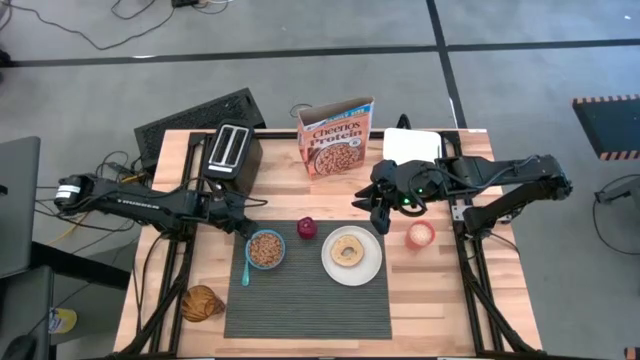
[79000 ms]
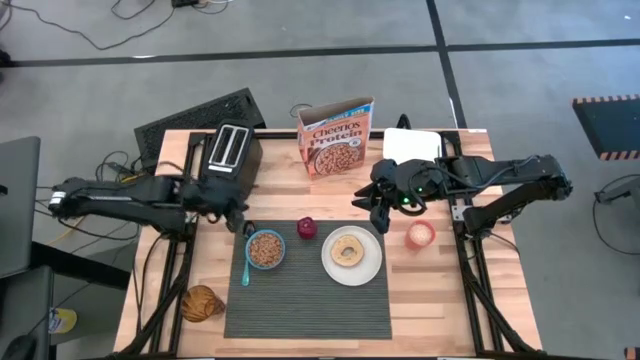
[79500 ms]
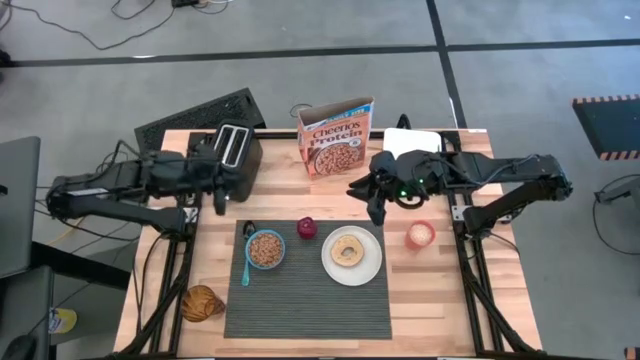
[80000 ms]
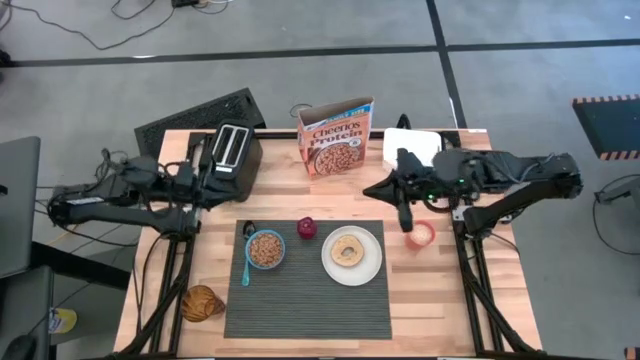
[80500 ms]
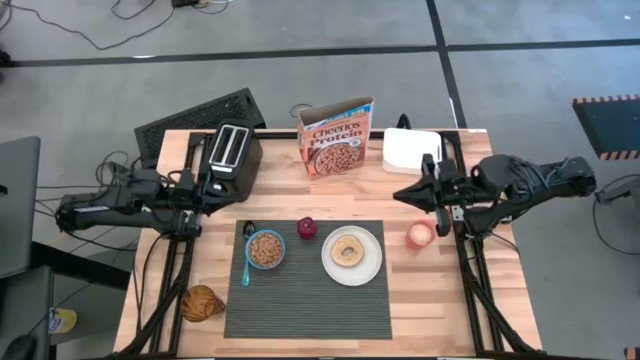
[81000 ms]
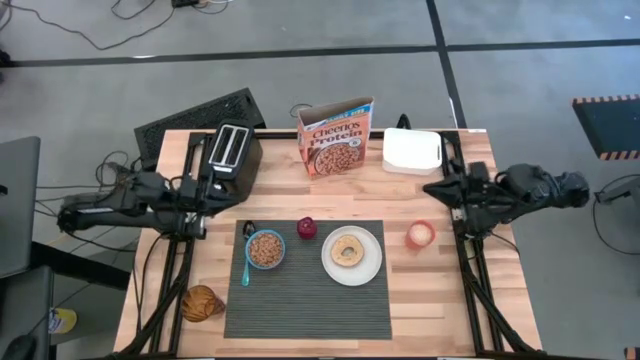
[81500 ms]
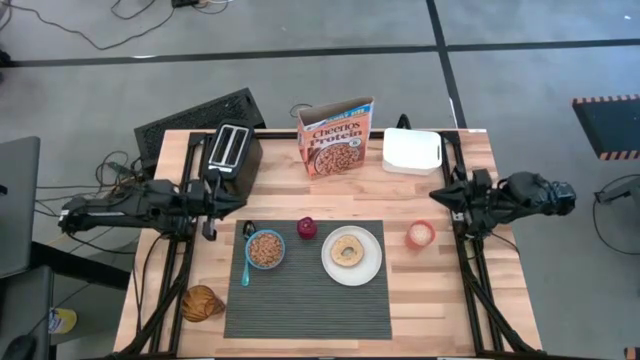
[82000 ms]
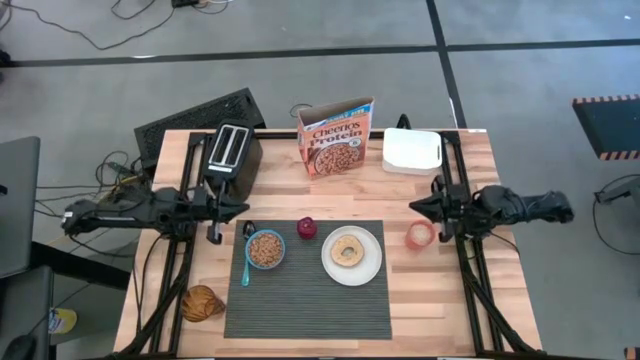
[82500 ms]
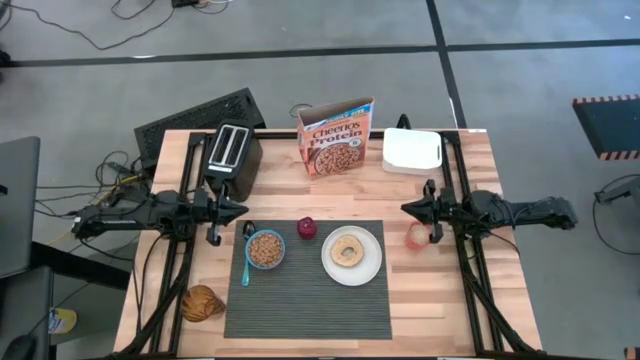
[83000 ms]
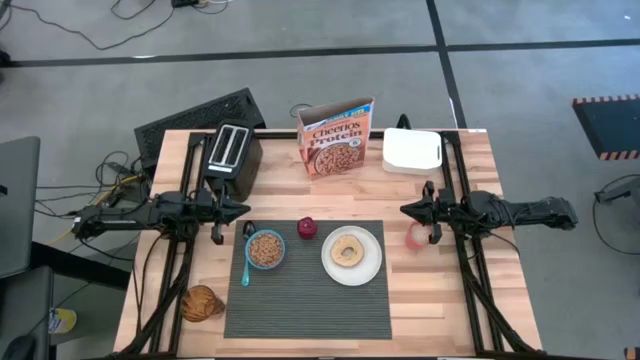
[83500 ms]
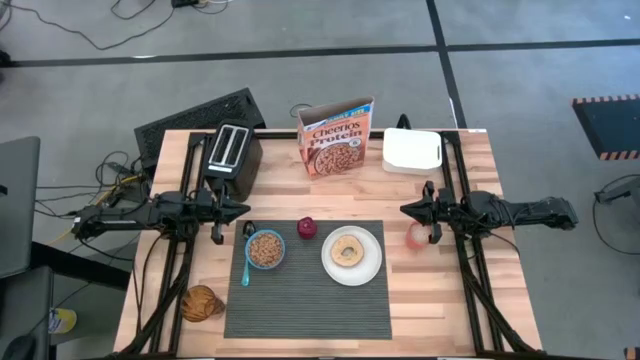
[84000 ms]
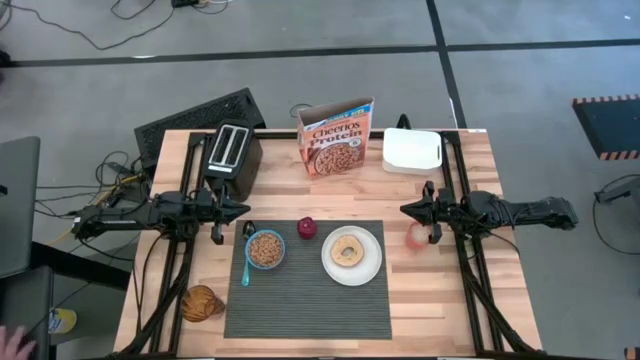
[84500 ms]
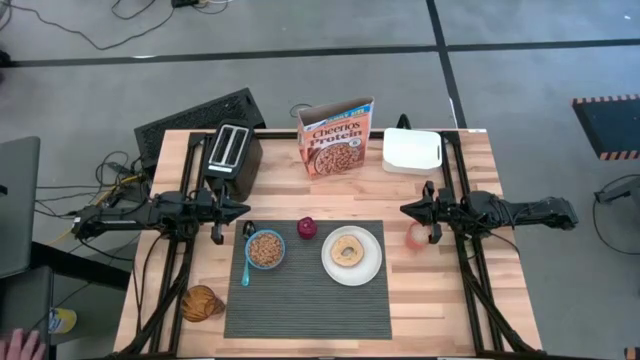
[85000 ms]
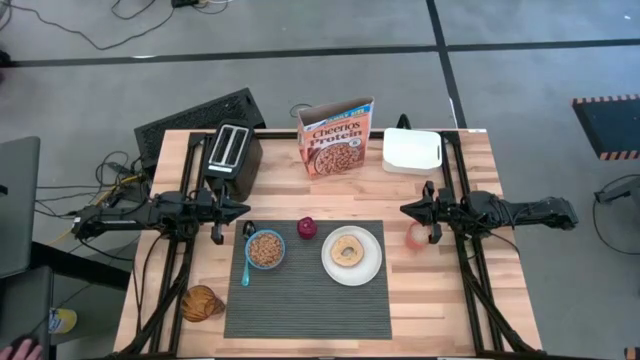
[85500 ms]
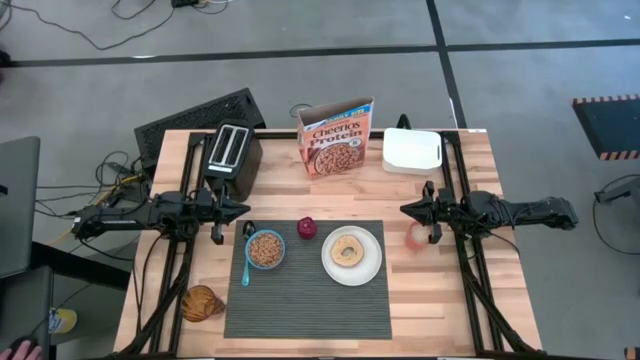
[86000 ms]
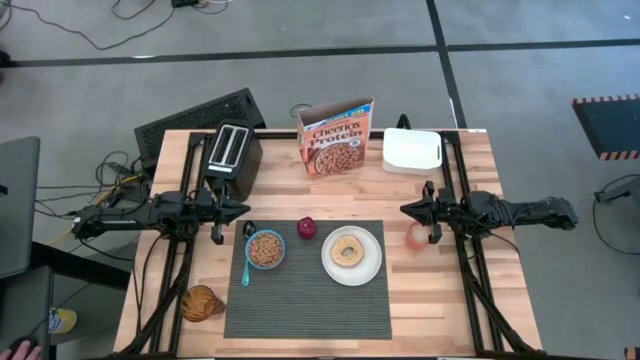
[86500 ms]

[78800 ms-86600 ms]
Task: Arrange a breakfast setting
Return to Home Position

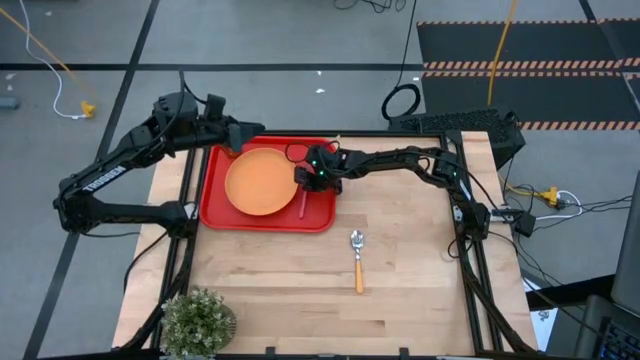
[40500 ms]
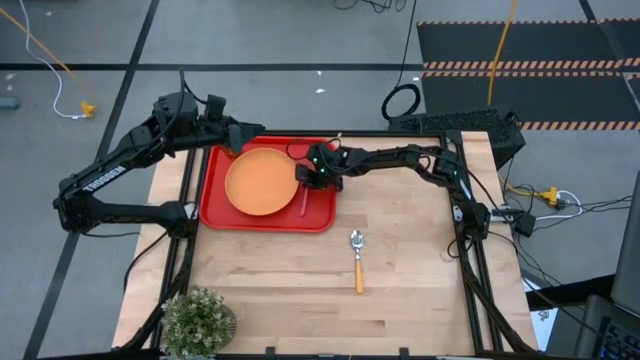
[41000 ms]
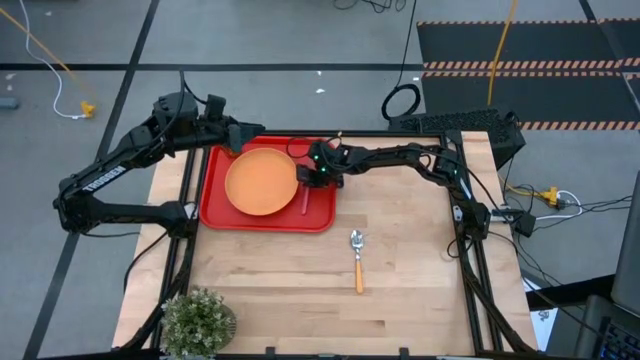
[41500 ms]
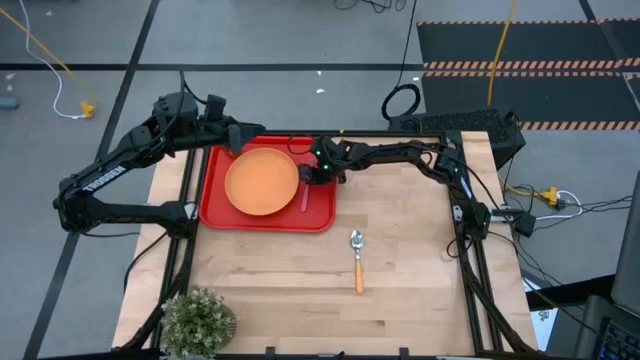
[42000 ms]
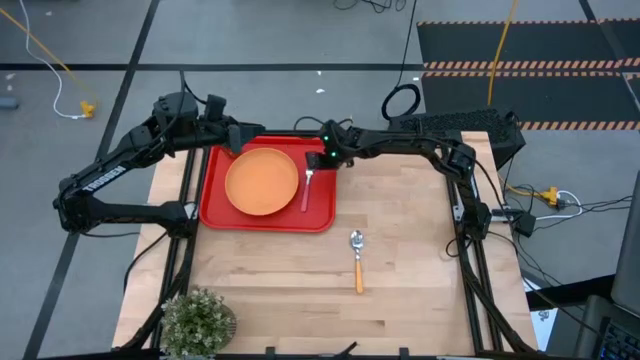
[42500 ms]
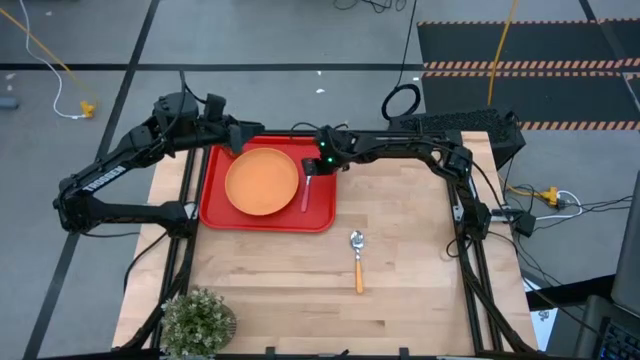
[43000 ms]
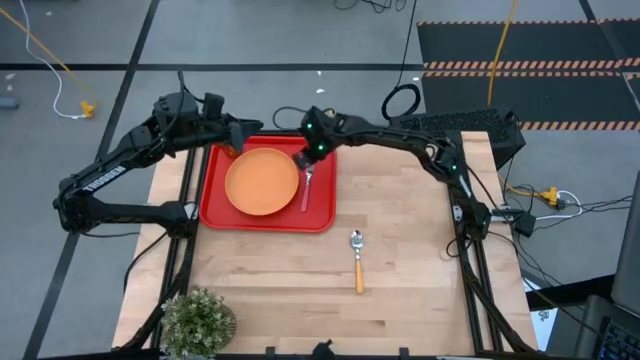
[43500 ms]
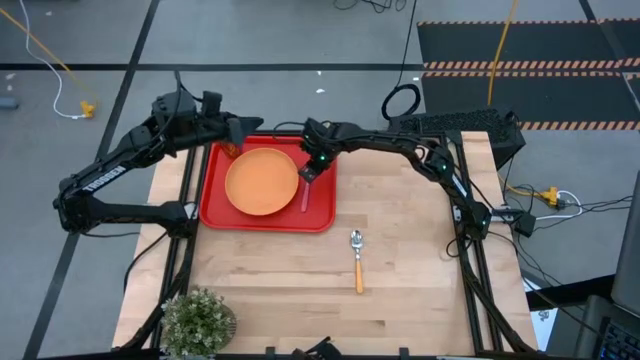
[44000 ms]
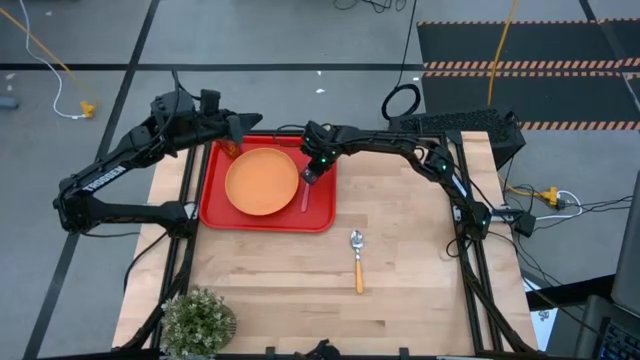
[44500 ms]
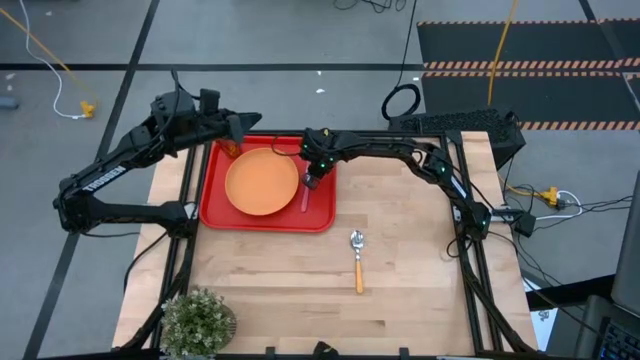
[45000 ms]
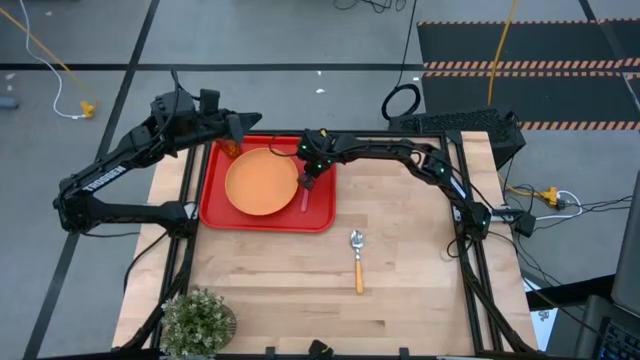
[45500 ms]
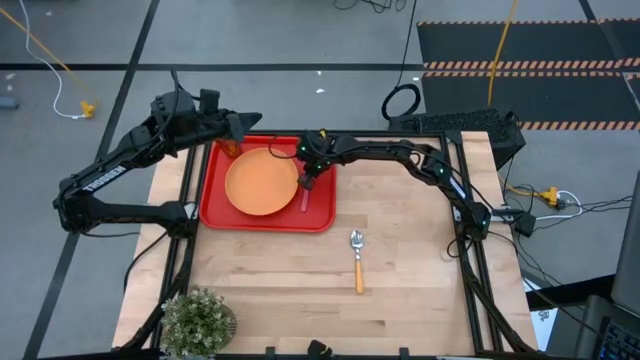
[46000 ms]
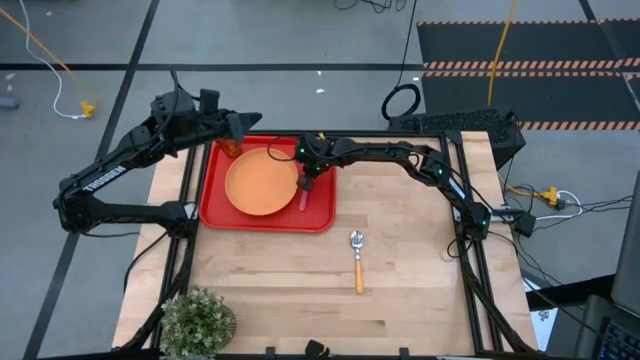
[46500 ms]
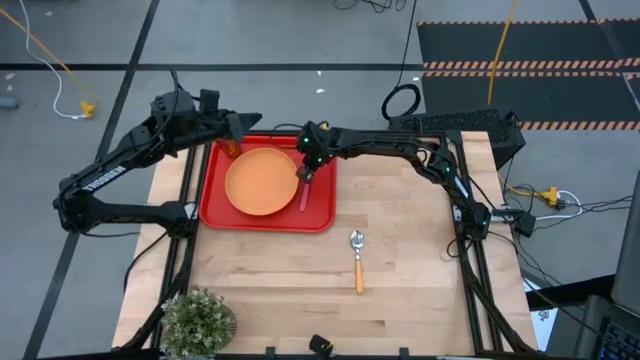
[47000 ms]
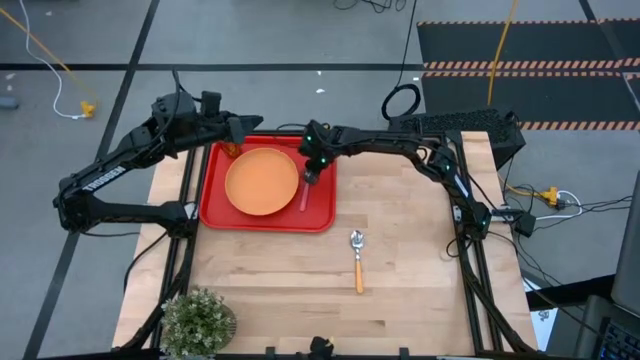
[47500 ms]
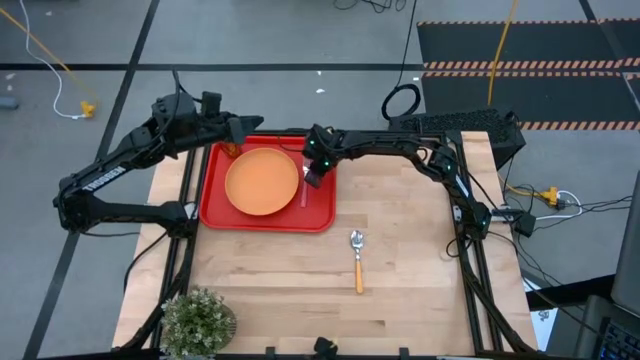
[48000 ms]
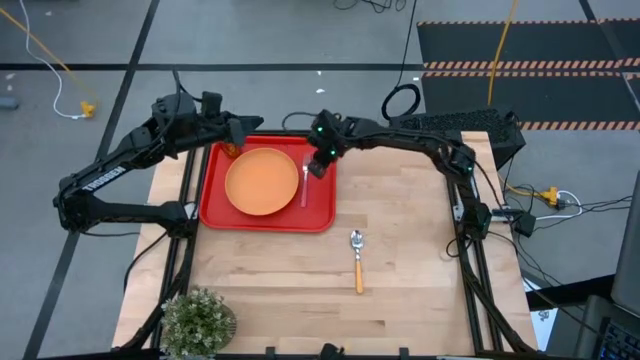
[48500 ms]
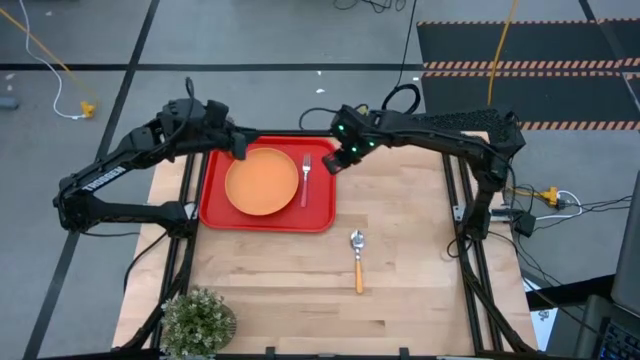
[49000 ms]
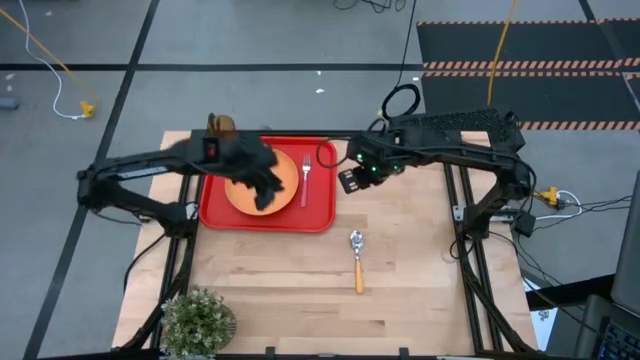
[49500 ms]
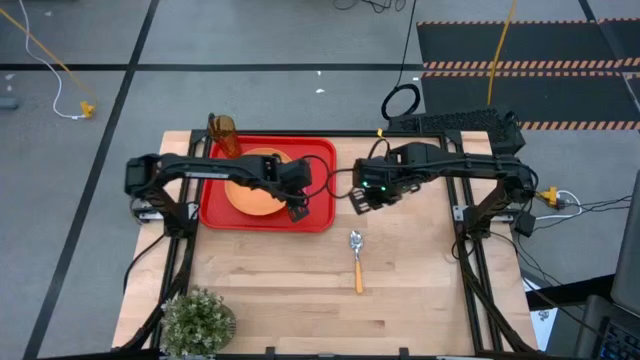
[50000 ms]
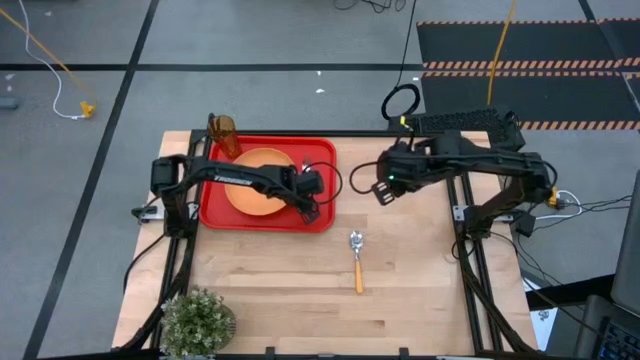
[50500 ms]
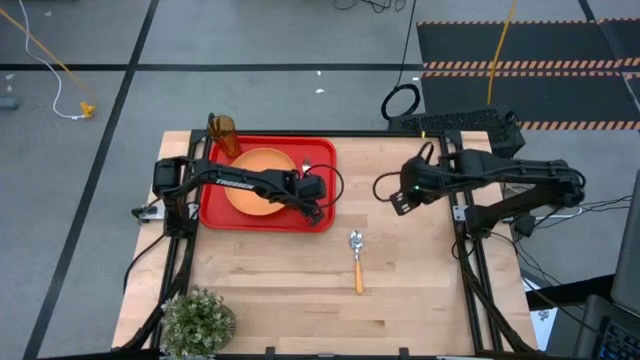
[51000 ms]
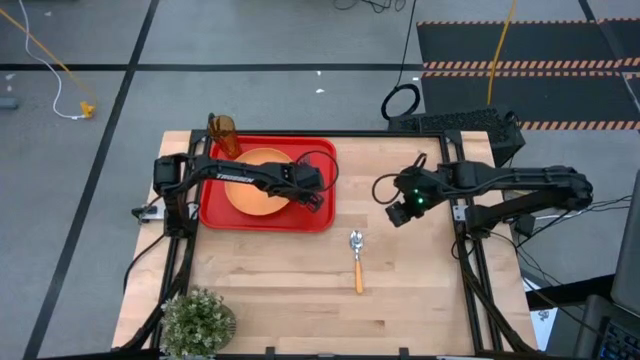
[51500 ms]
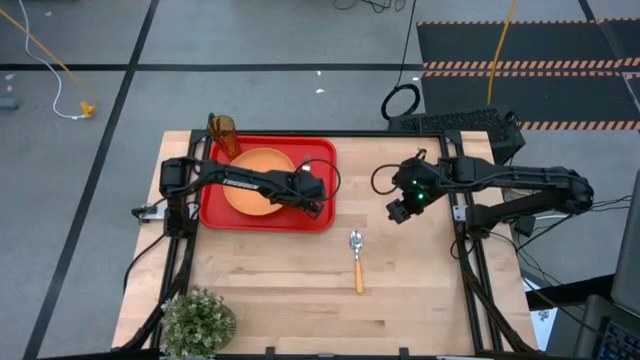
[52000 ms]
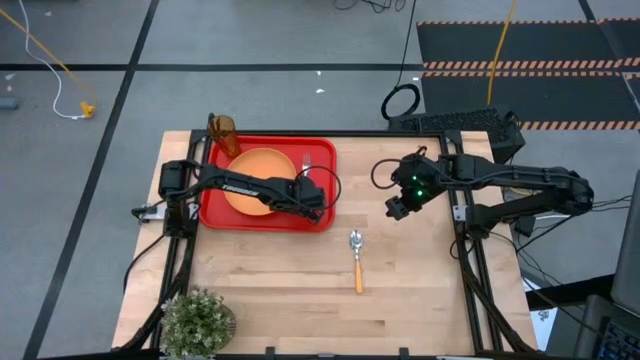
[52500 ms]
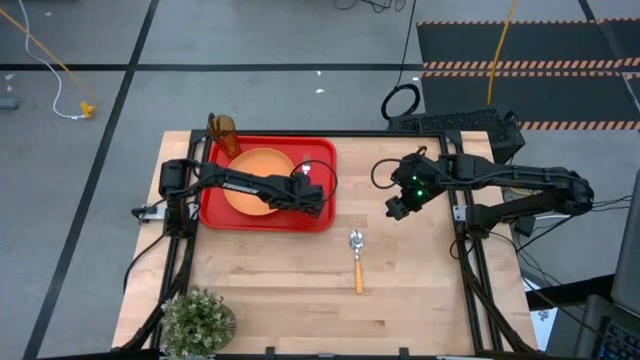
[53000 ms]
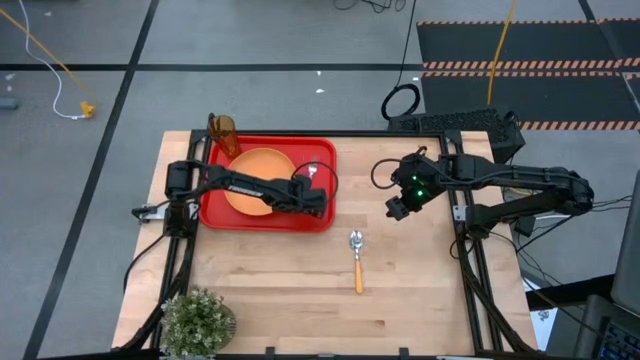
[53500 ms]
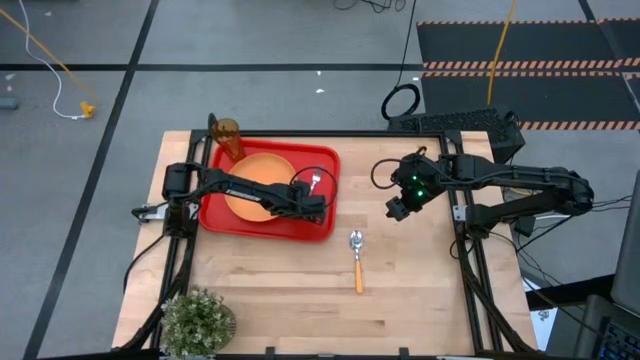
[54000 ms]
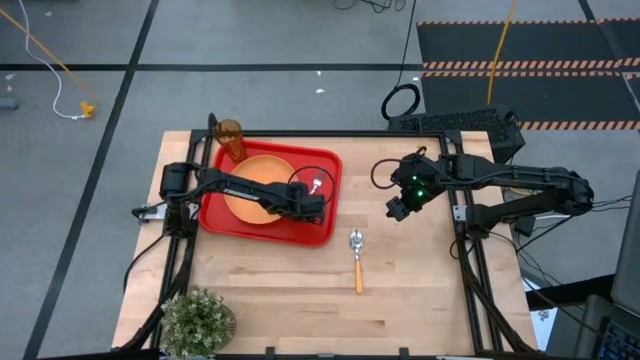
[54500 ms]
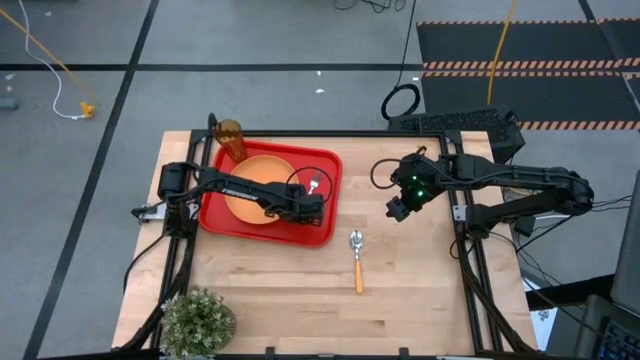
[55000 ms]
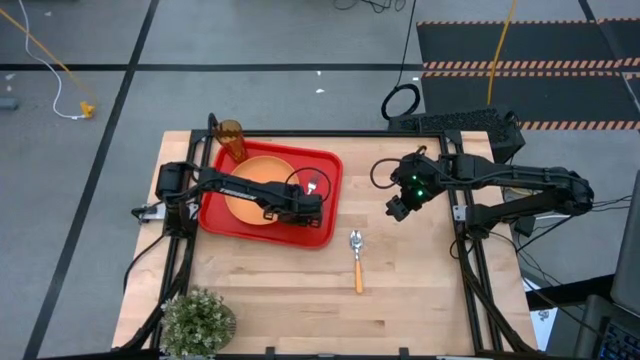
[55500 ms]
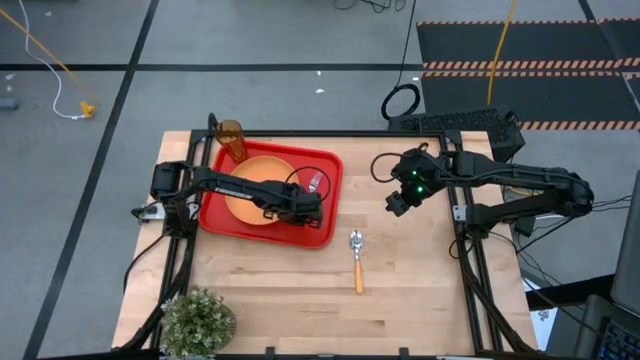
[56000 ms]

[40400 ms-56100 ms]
Task: Pick and place plate/cup/fork/spoon on tray
Put the pink fork on the red serving tray to the right of the orange plate
